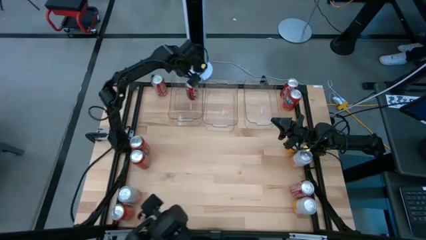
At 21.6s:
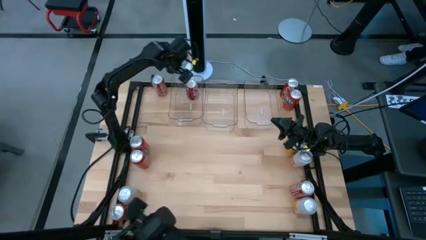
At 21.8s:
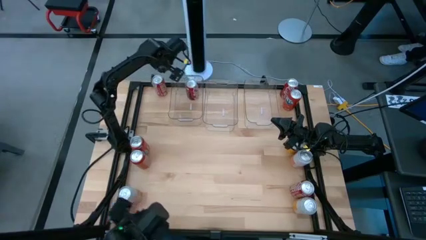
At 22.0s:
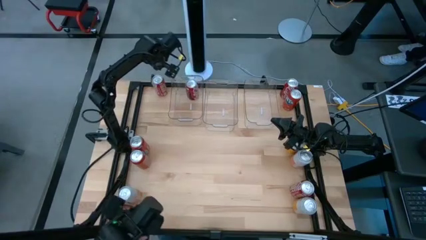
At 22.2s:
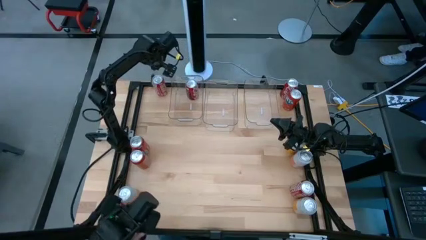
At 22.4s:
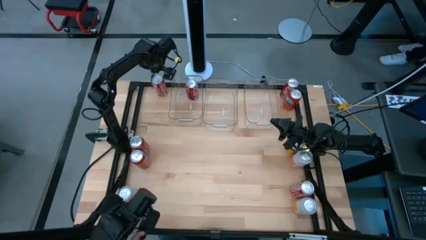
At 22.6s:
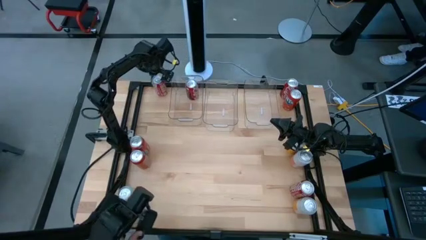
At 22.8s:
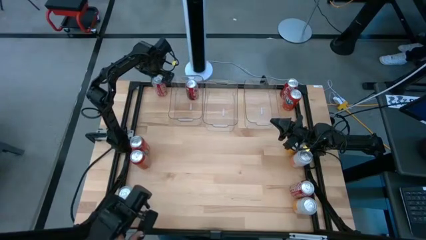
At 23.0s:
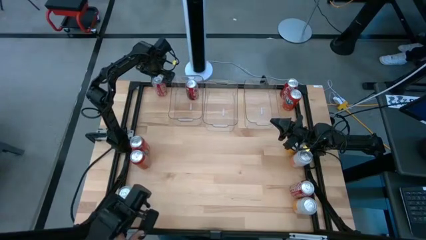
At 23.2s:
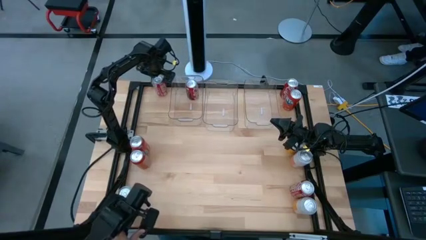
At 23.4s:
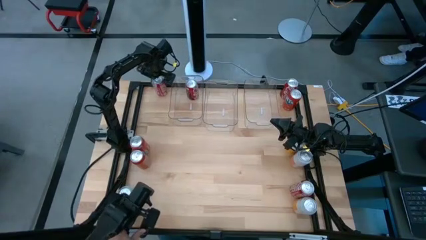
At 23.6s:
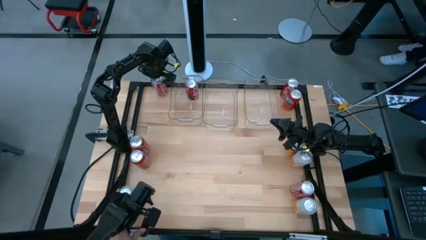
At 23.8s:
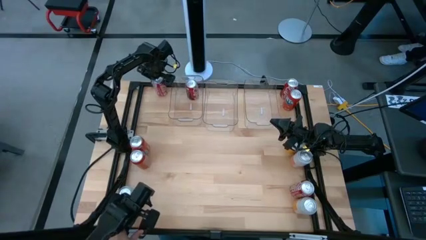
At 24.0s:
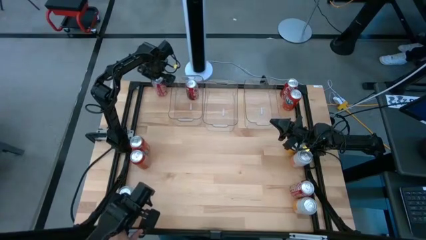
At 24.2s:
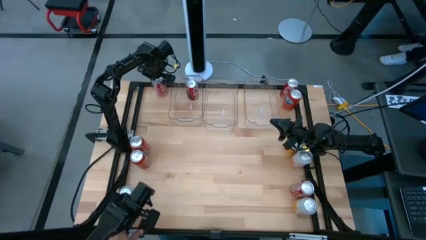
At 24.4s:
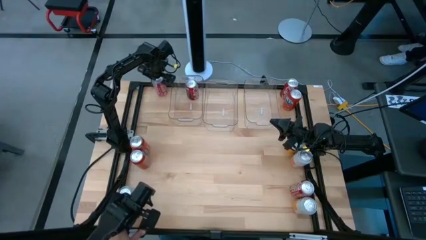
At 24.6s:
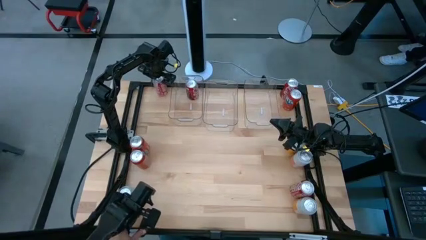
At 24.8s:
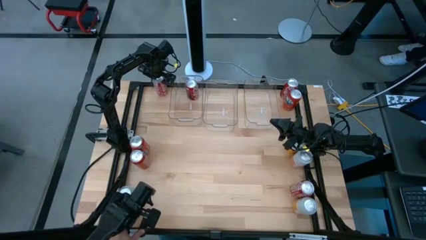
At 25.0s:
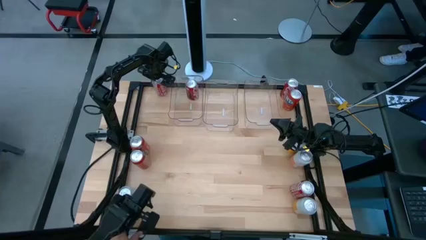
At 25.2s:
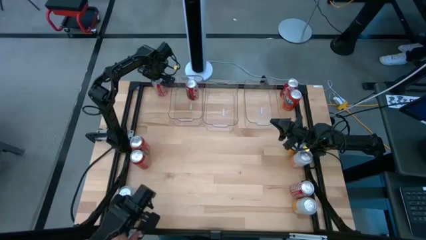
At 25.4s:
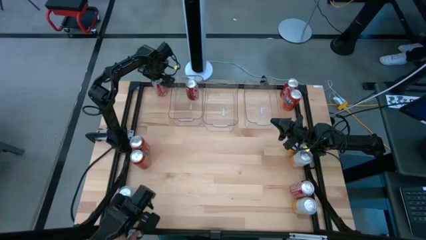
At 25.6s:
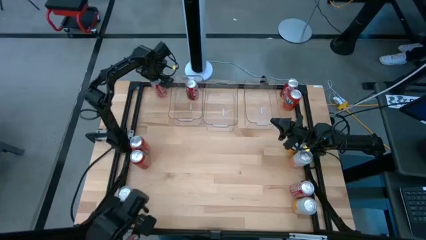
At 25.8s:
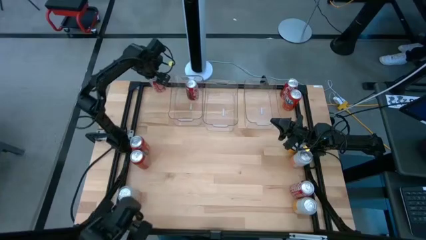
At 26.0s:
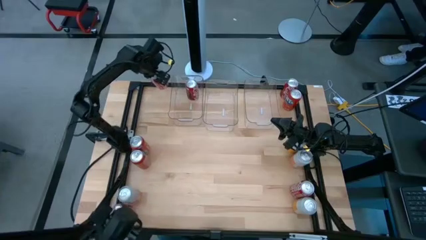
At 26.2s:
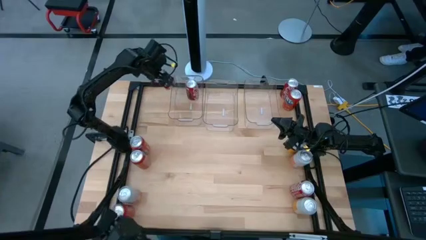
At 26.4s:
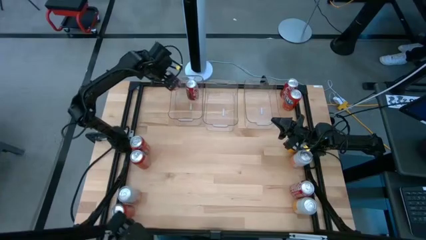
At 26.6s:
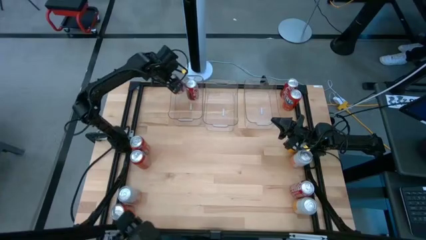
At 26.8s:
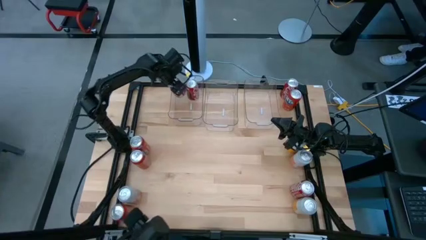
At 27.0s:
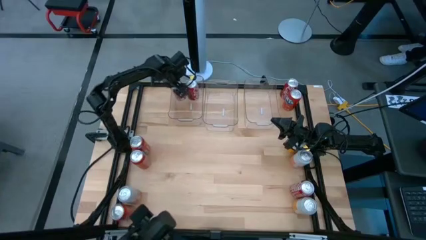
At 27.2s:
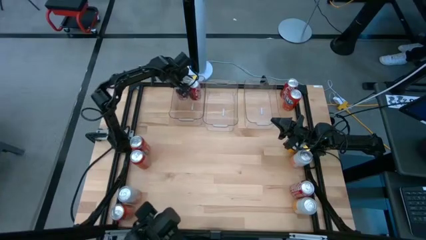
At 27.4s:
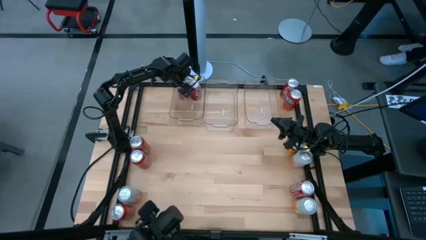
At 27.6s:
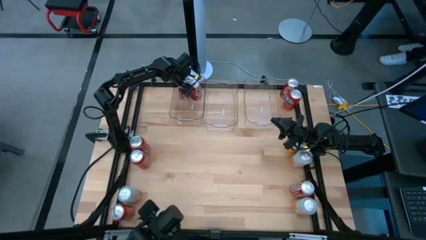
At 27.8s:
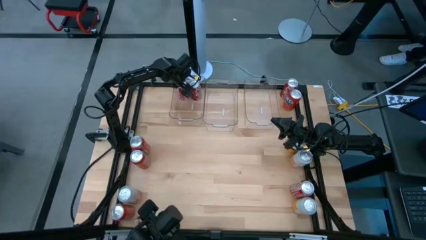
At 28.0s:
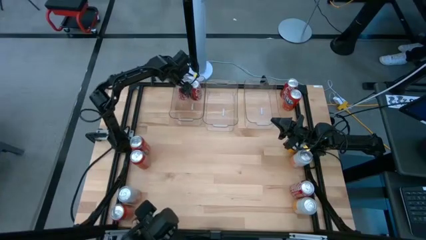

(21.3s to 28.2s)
Task: Sort soda cans
Put the top left red soda can into the left transparent bin

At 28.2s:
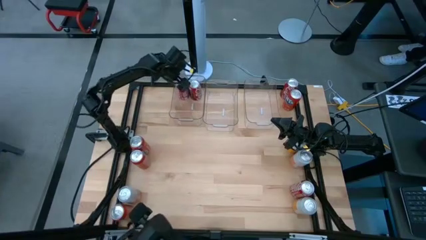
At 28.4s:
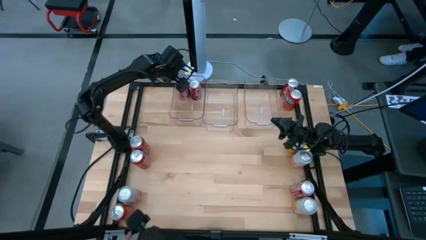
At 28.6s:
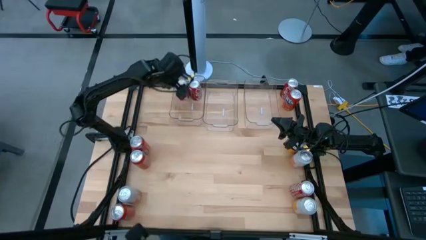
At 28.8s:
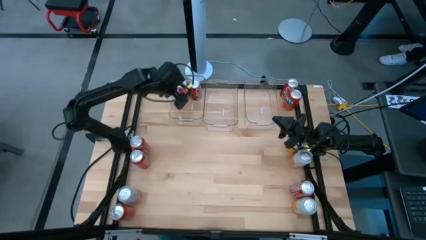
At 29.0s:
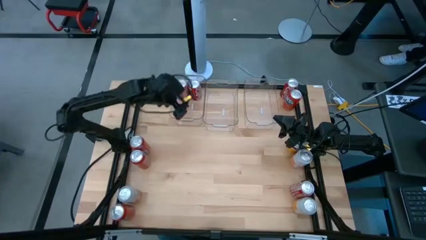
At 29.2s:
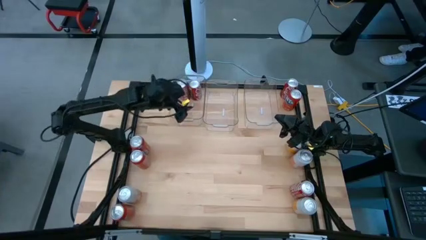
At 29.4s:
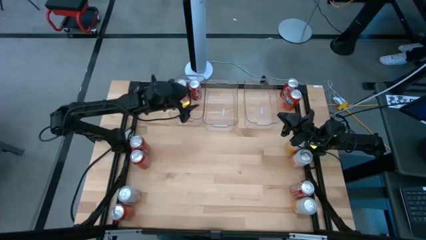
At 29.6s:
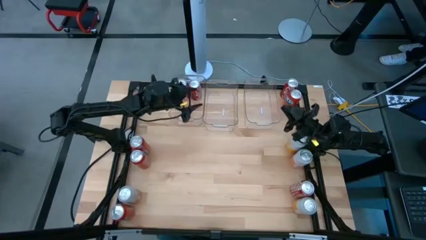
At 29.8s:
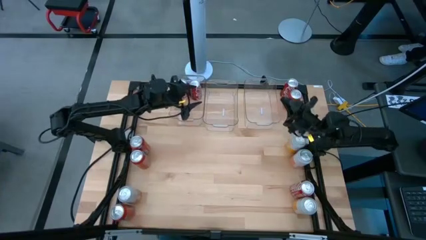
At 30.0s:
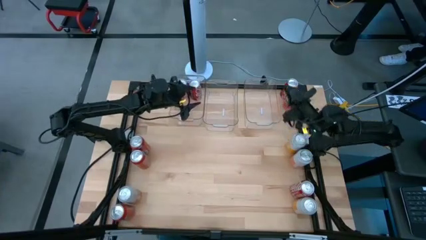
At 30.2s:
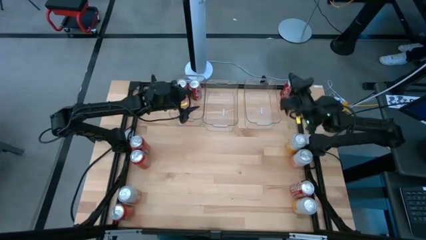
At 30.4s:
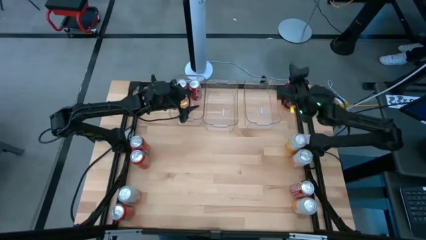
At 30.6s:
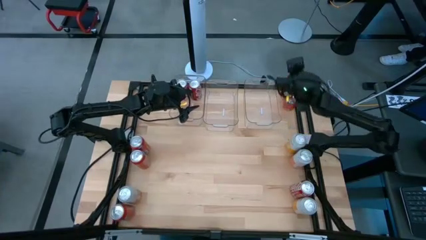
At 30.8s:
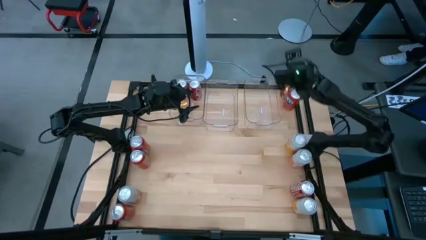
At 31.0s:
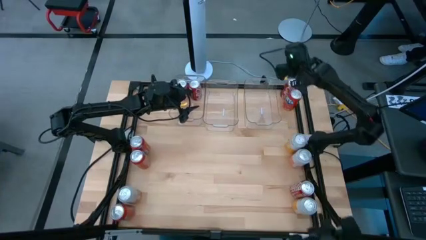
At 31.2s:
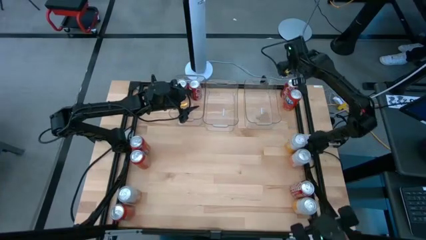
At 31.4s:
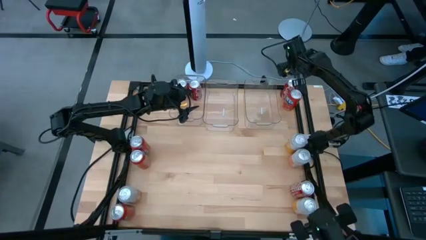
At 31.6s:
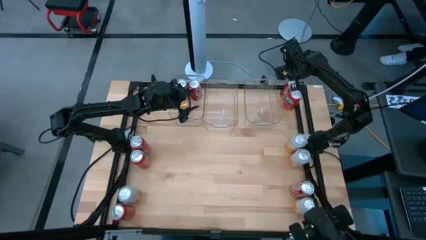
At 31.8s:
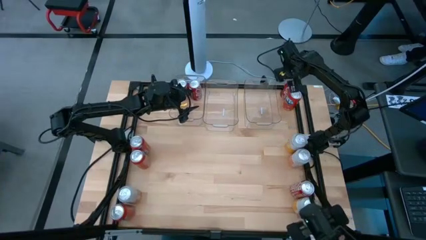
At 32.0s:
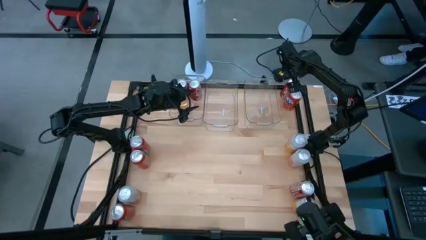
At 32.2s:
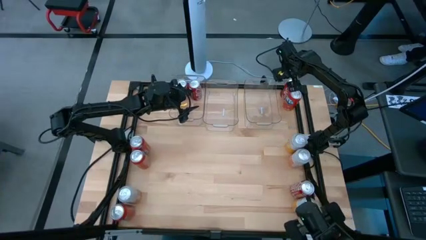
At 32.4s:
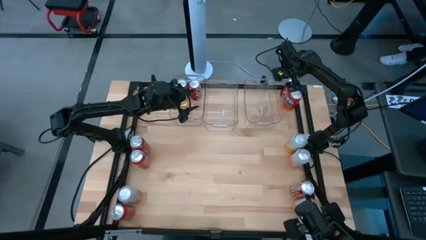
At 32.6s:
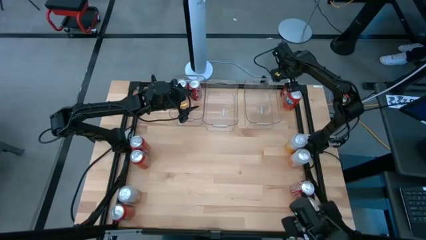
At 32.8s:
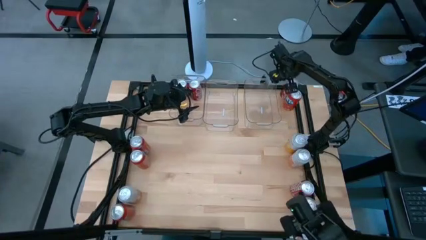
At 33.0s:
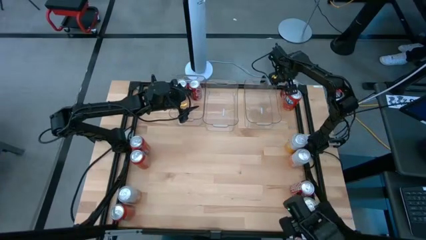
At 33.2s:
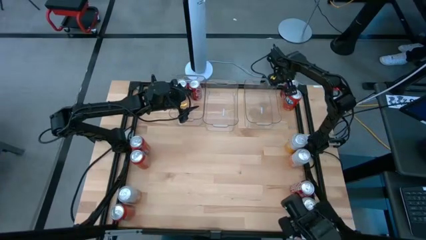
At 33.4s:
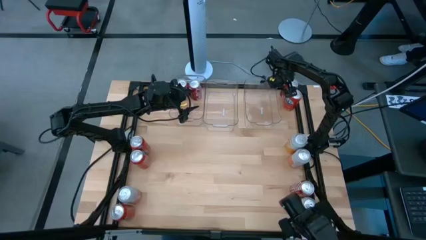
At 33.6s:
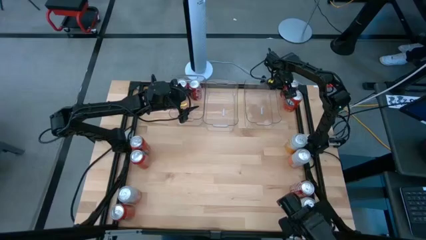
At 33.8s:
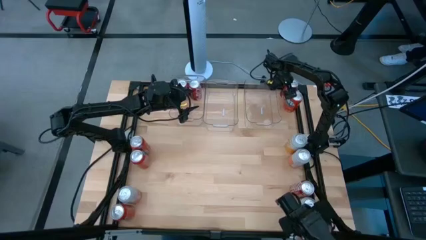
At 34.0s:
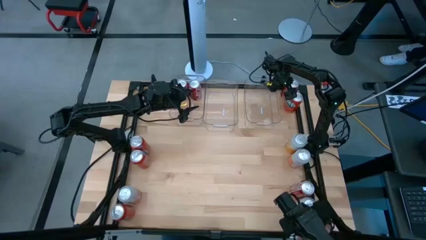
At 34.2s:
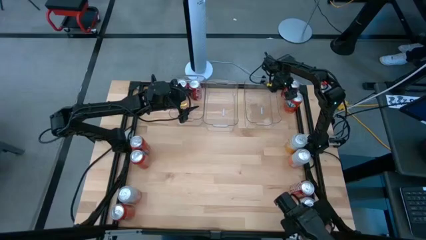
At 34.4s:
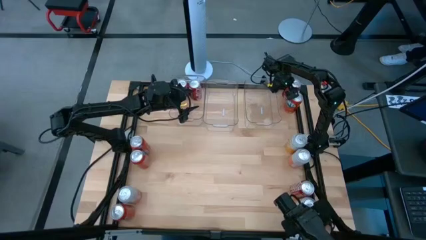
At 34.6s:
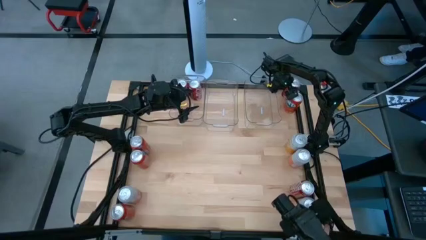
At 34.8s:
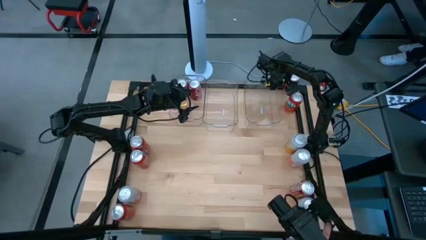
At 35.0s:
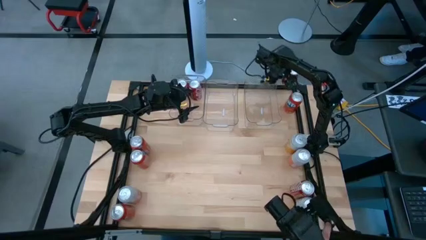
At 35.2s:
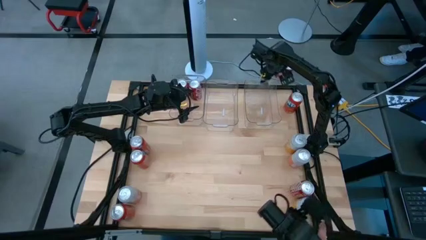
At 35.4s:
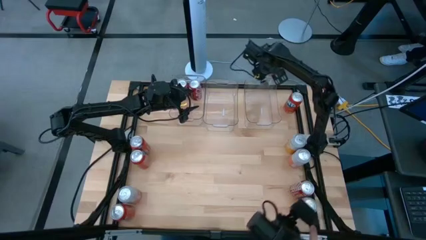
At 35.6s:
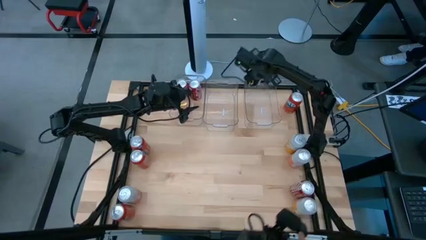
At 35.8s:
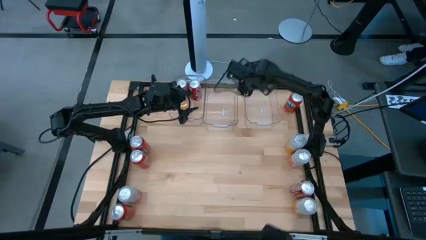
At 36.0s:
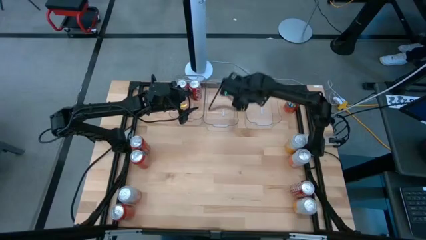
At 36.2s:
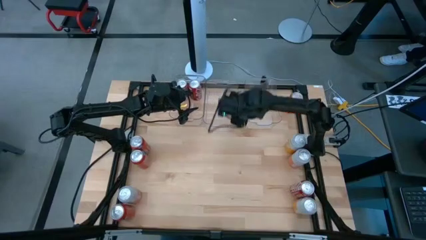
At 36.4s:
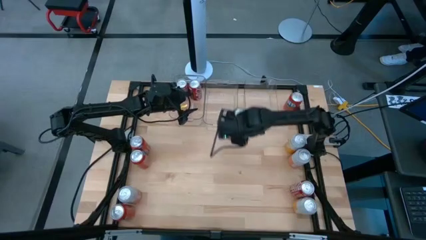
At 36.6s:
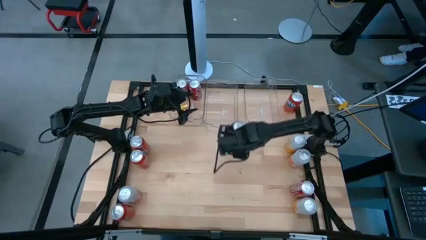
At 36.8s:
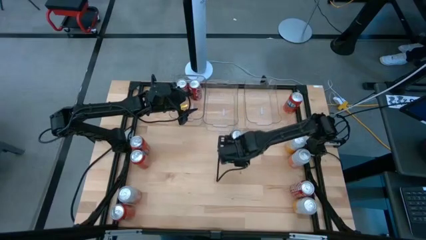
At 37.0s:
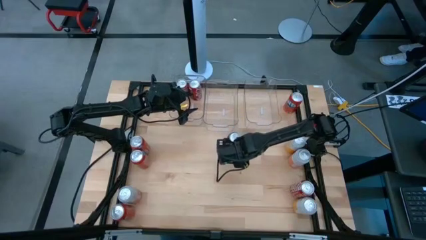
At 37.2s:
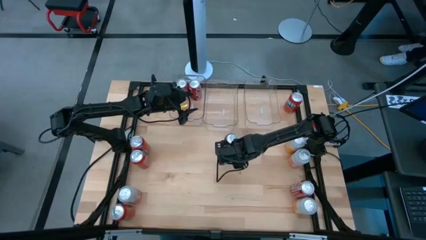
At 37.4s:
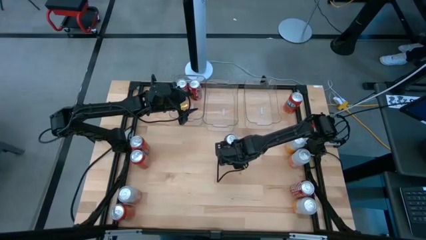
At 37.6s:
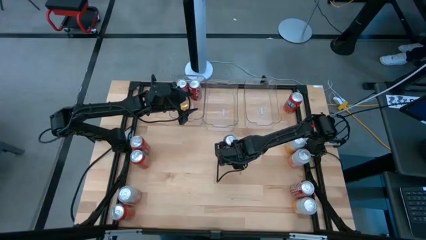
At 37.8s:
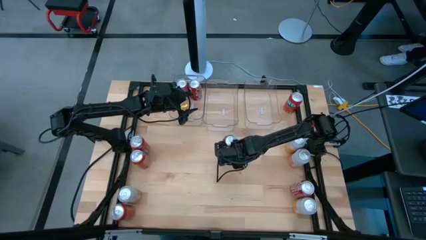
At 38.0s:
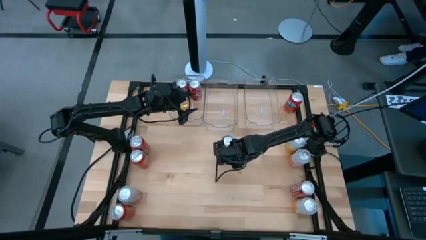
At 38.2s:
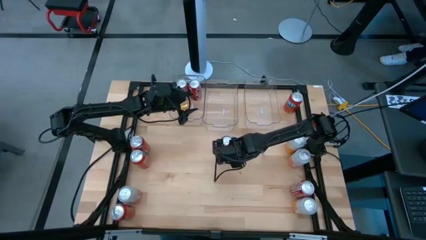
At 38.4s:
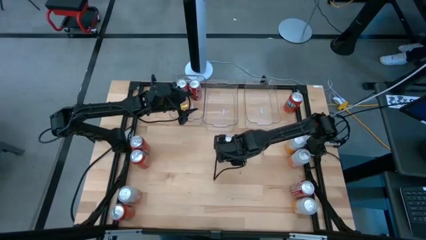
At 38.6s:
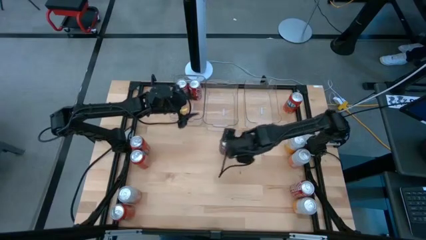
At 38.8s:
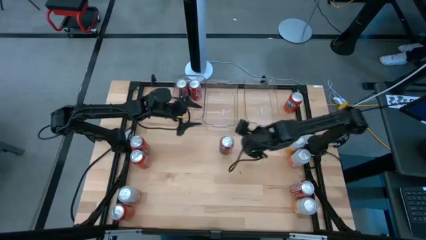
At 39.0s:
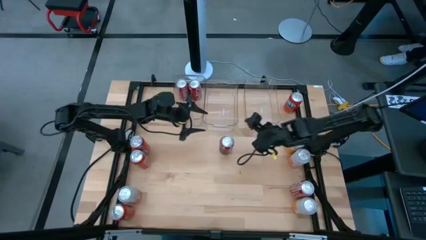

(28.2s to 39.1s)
Move the top right red soda can to the center of the table
